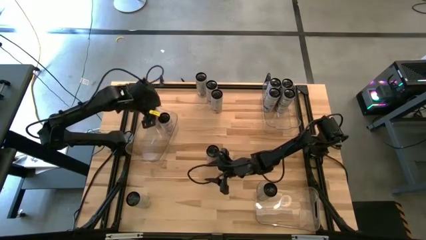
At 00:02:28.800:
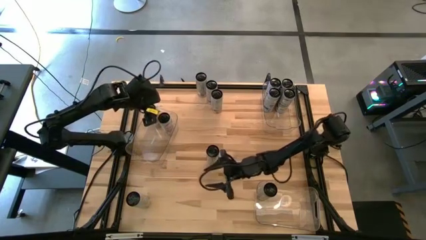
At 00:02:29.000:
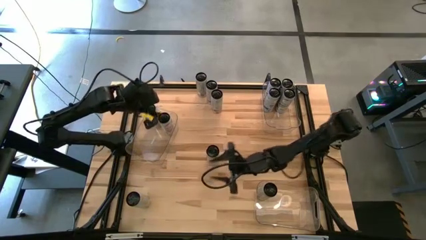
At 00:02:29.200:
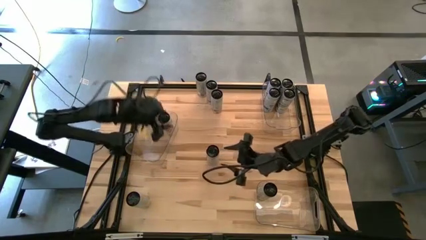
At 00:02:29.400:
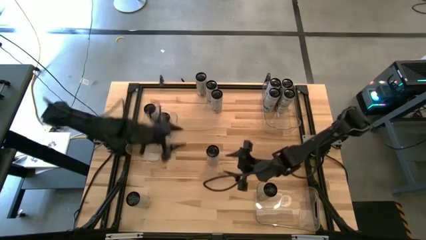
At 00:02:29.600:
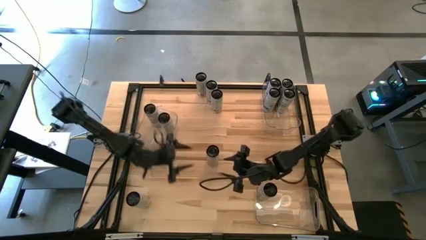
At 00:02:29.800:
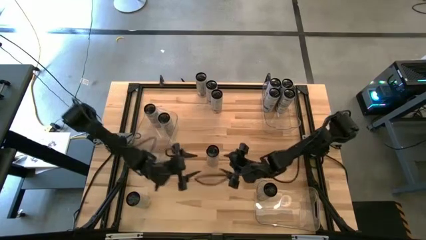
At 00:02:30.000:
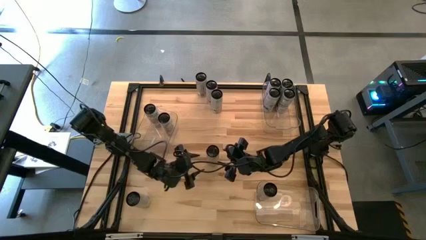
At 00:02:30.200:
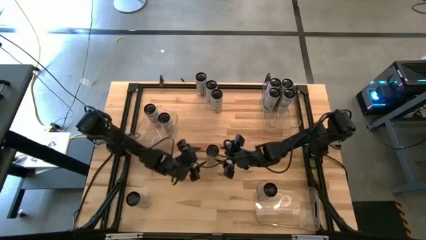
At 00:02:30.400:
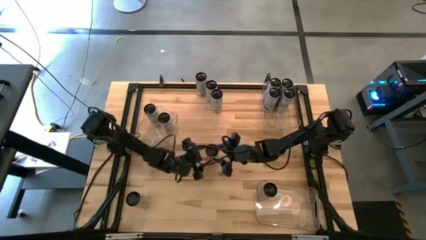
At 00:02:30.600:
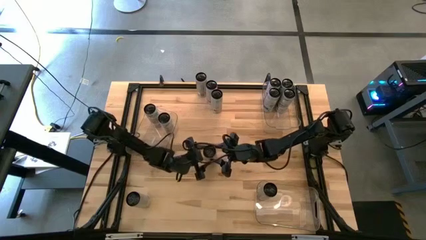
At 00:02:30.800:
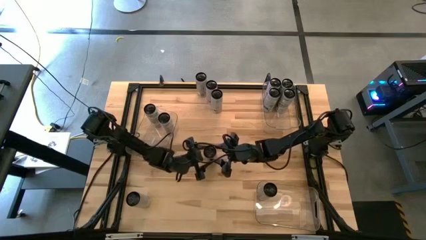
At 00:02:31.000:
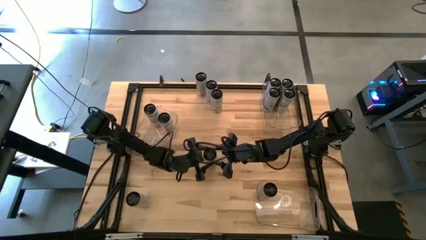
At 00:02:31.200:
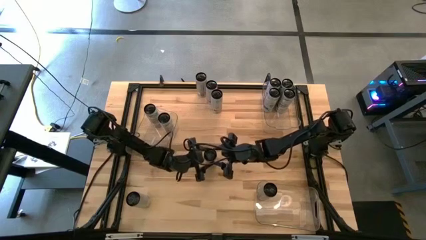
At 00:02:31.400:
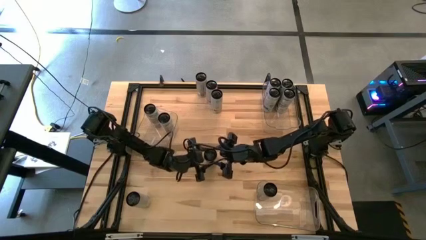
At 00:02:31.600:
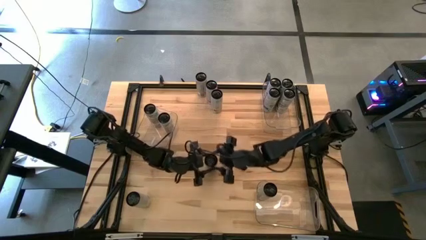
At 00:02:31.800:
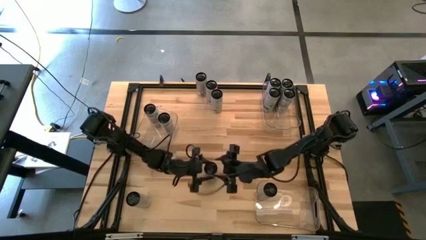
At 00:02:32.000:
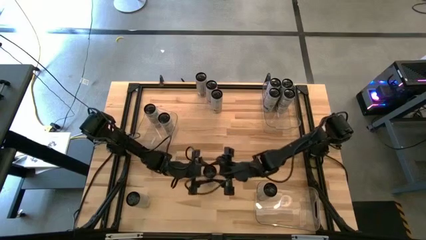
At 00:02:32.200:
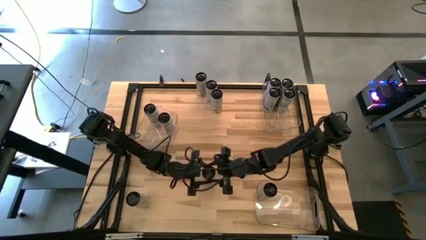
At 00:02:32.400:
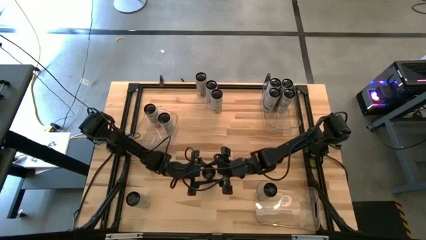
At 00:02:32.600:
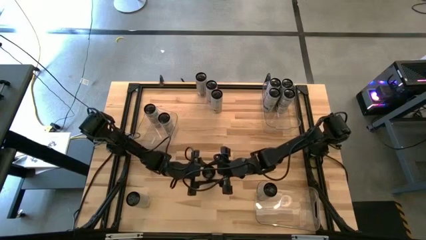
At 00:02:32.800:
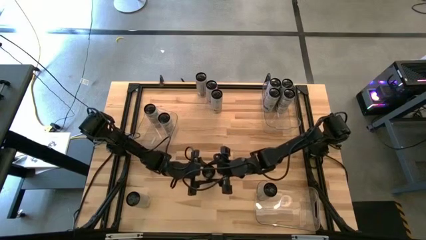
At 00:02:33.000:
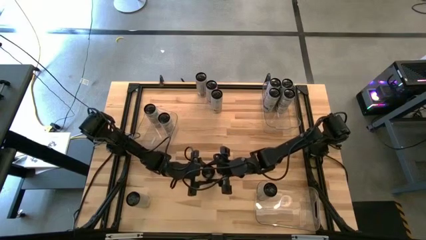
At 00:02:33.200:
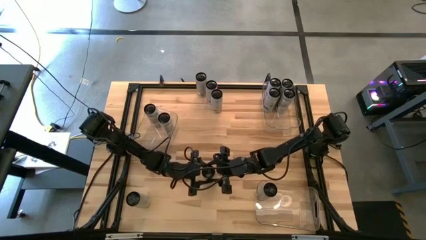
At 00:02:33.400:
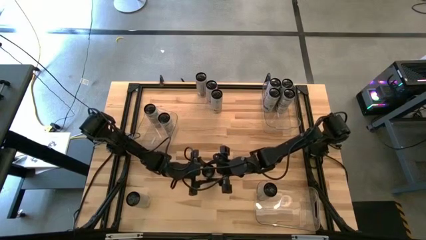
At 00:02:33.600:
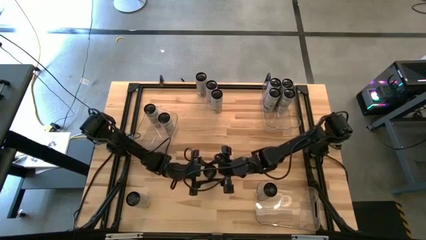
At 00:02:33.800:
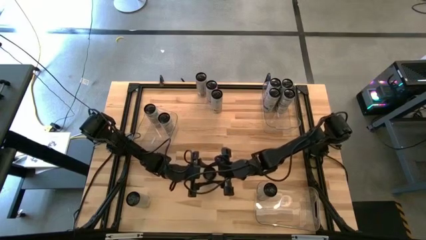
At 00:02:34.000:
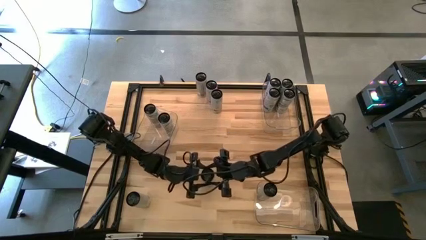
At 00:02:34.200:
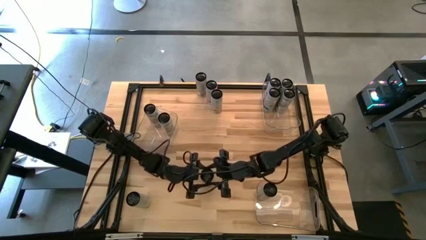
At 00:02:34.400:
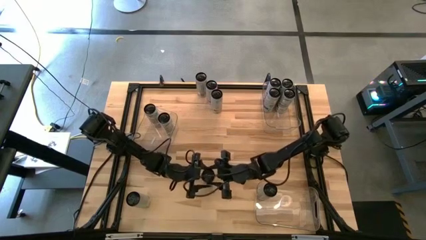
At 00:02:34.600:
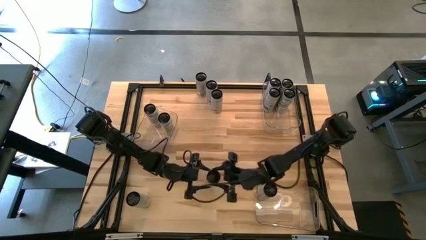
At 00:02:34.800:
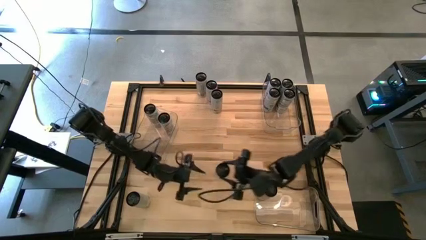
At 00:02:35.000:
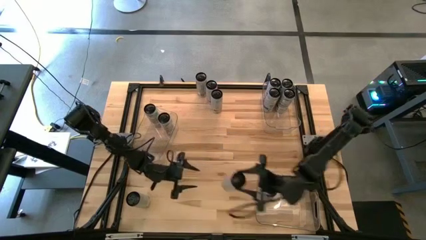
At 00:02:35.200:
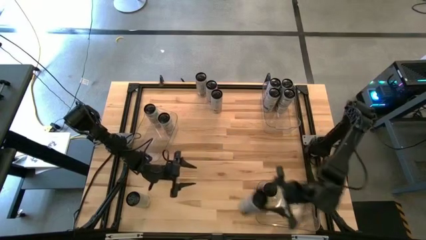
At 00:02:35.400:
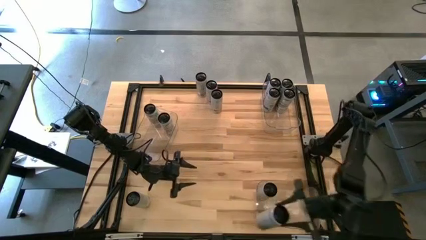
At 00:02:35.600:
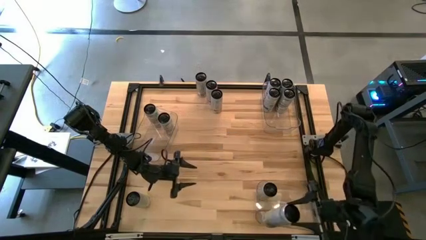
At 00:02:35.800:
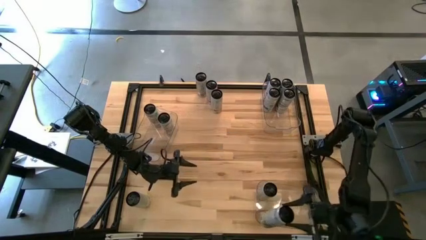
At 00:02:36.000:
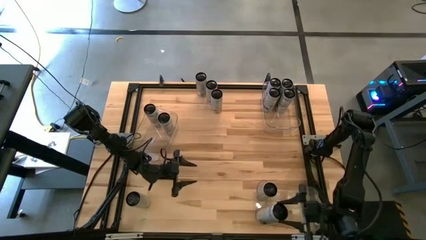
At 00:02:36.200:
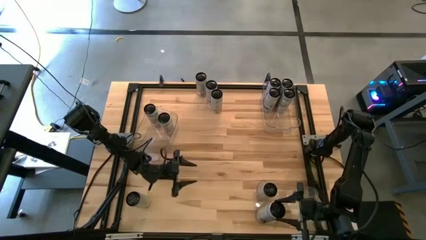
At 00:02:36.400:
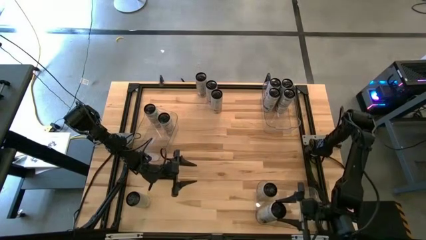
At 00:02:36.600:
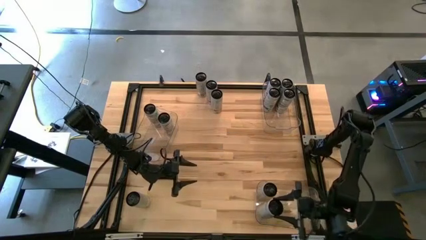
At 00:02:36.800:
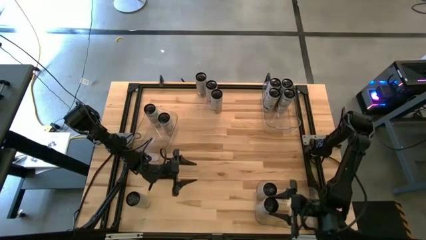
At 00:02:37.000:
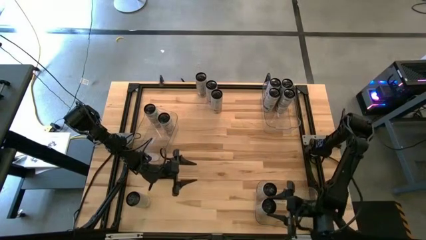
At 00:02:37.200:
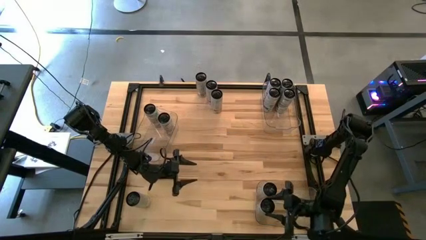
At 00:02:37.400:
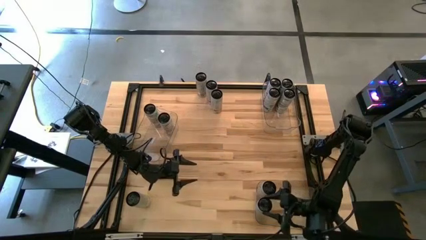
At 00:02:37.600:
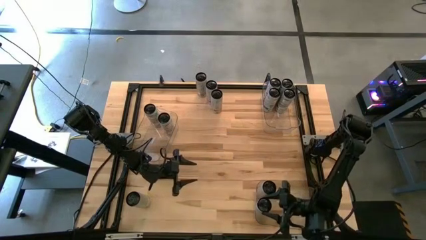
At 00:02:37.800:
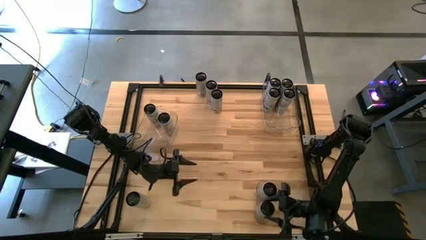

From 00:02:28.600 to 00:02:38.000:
Task: Sort soda cans
Put the white-yellow soda can into the bottom transparent bin

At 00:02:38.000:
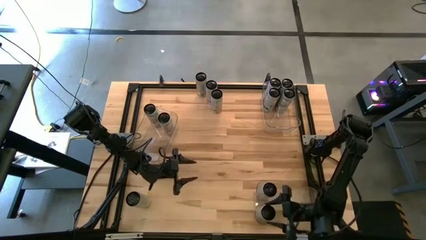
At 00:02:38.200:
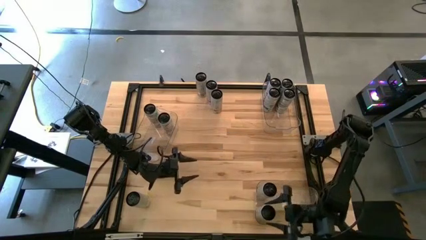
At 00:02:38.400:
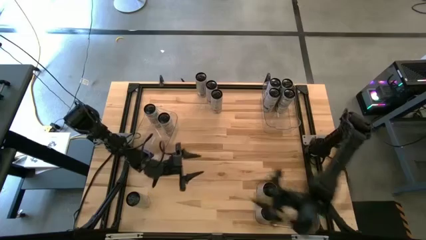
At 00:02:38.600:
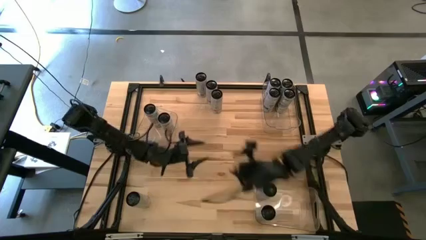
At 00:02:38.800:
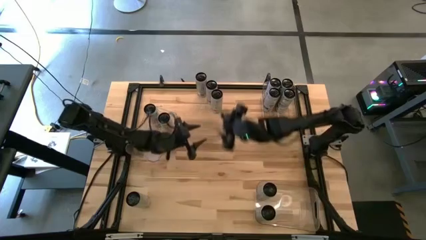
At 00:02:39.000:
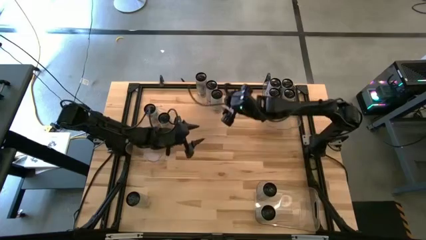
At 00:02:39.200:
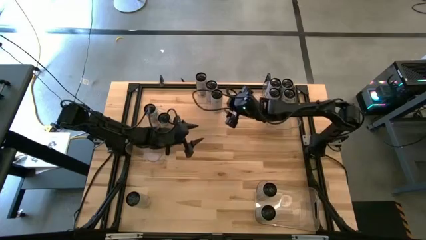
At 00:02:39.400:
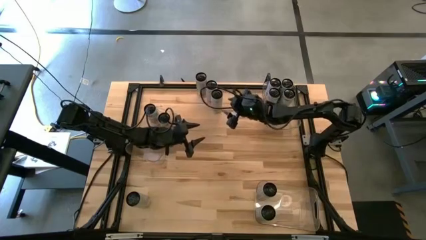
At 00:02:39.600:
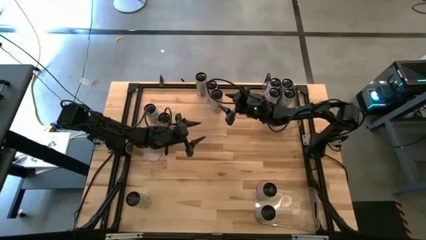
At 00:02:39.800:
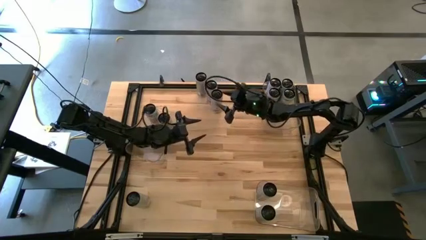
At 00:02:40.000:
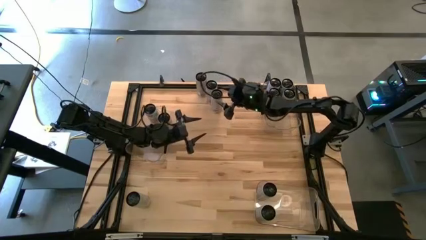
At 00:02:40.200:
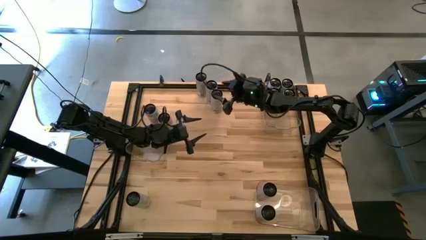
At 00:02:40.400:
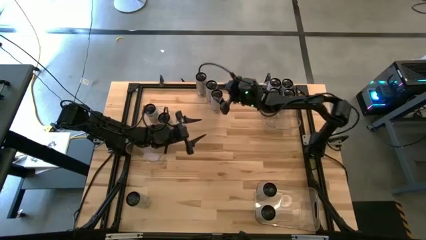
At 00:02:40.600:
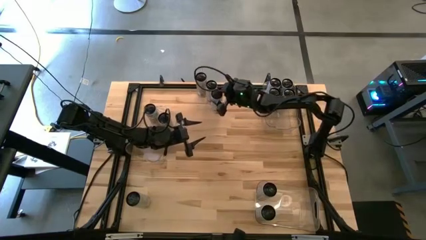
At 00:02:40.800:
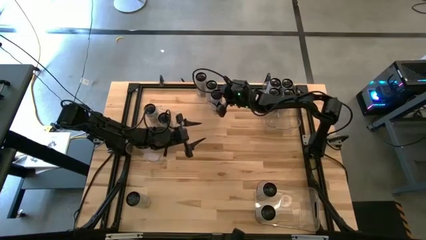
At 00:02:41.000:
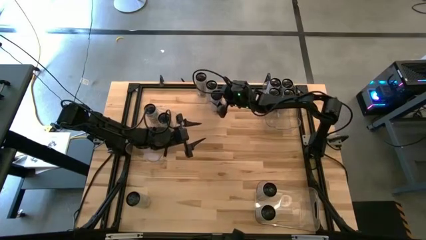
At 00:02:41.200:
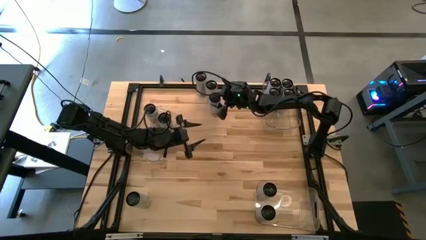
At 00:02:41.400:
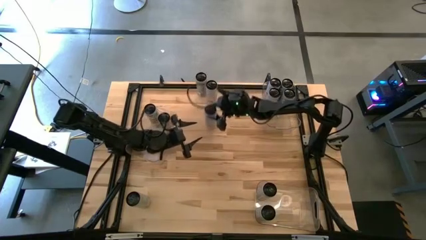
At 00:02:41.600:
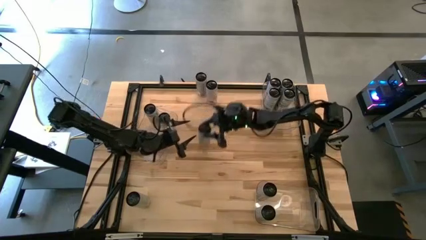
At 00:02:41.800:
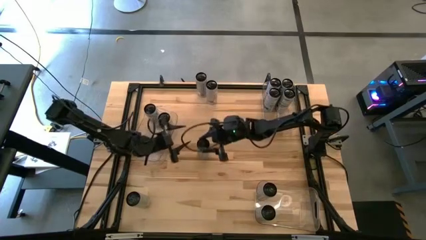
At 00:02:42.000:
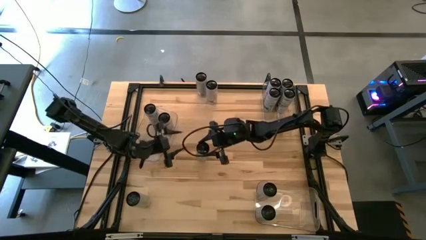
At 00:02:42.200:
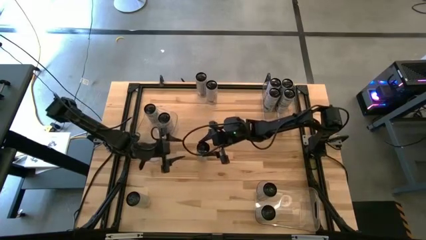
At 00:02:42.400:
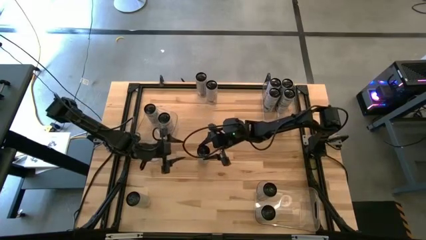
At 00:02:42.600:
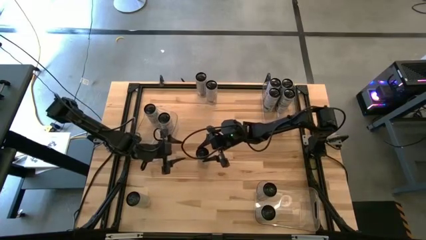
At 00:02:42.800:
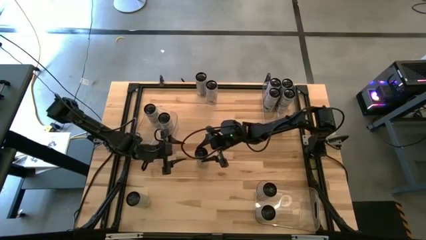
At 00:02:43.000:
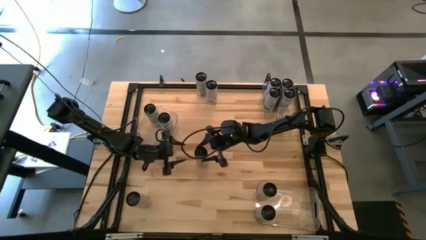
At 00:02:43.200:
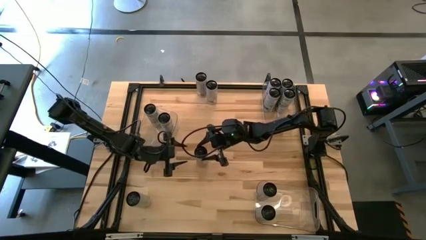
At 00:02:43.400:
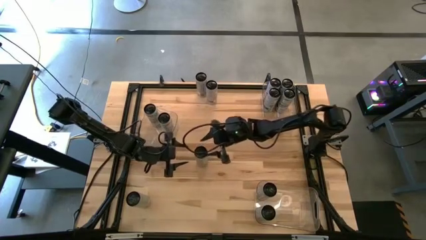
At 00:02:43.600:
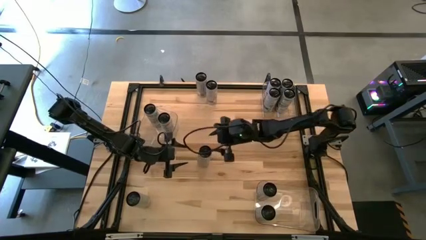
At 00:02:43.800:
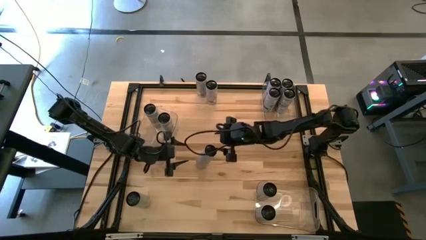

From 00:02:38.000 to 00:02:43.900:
Put the white-pink soda can into the middle transparent bin

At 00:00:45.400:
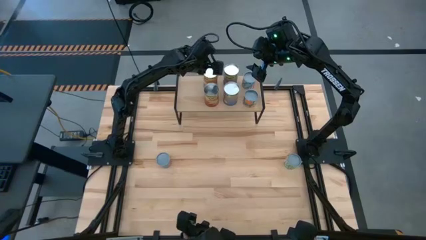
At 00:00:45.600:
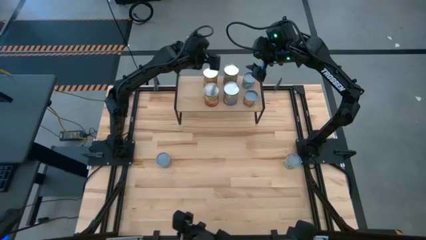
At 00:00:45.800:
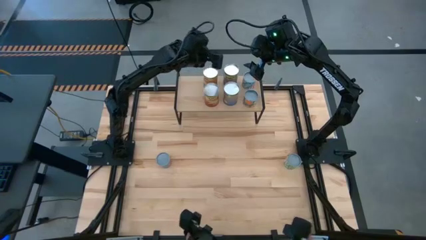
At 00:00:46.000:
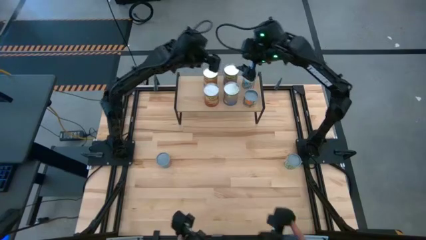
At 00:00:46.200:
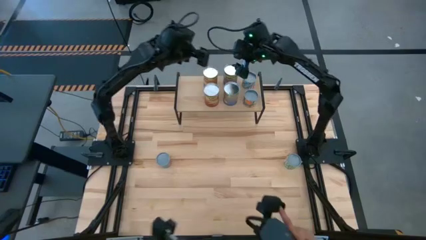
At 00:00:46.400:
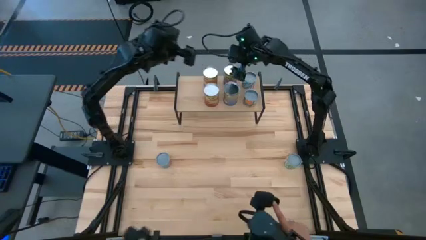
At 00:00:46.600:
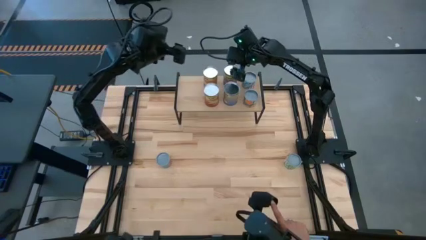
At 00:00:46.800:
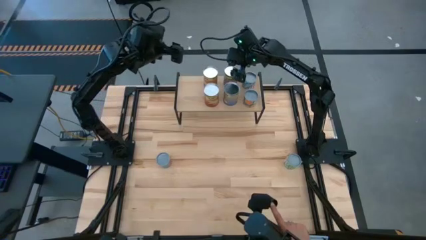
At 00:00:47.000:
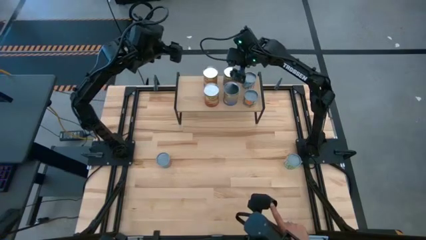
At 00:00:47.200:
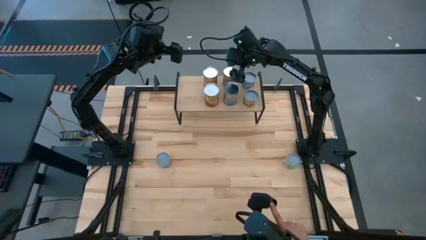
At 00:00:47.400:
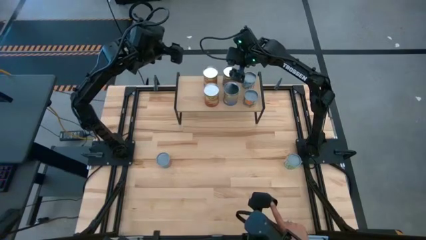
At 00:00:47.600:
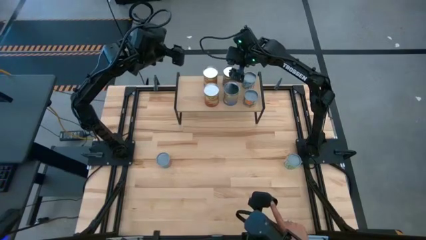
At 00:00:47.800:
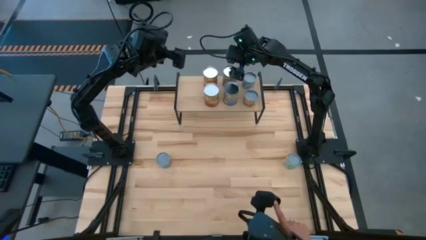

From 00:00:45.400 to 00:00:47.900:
Task: Pick and place cans onto a shelf
Adjust the canned peaches on the shelf
